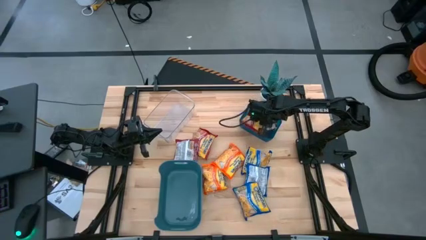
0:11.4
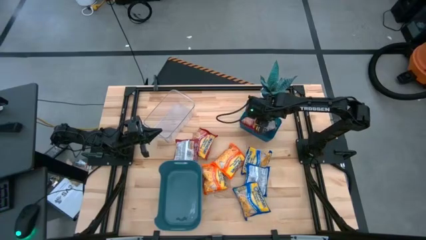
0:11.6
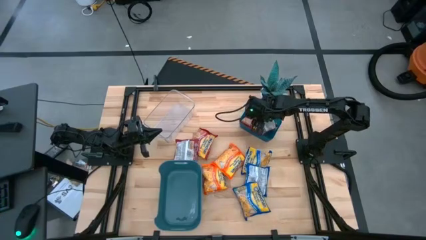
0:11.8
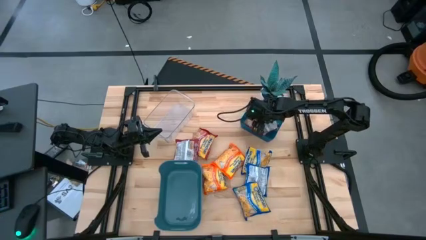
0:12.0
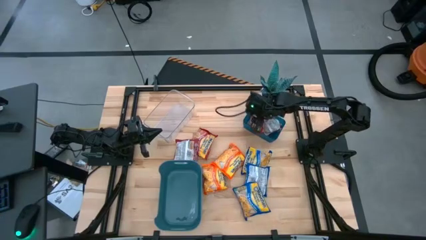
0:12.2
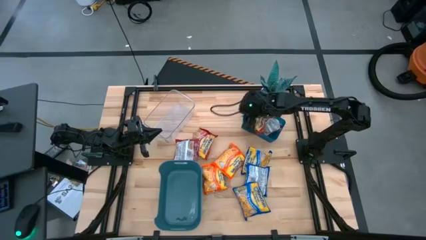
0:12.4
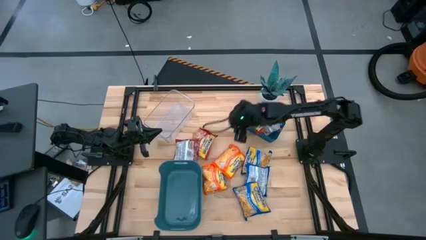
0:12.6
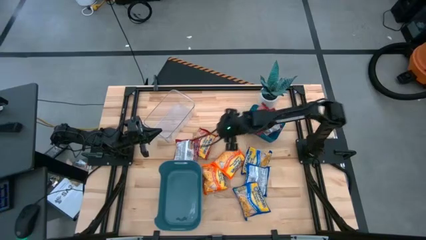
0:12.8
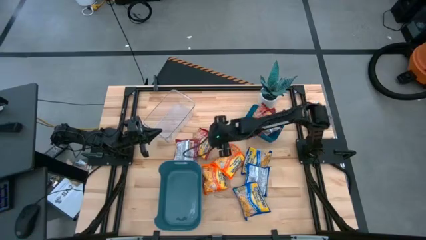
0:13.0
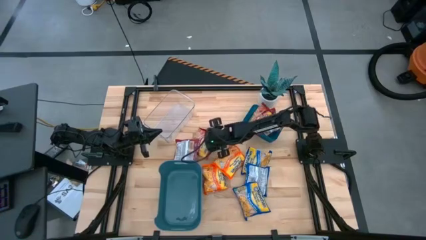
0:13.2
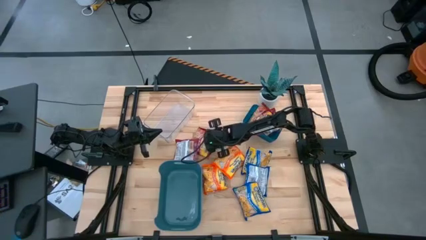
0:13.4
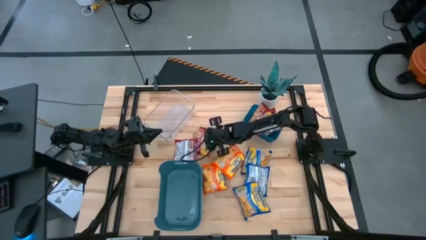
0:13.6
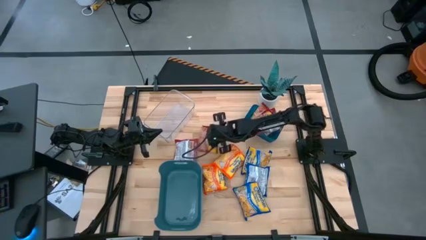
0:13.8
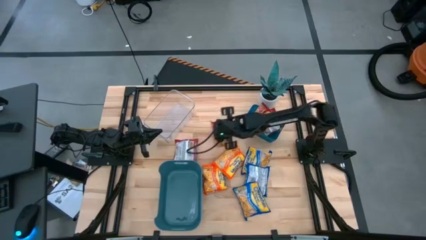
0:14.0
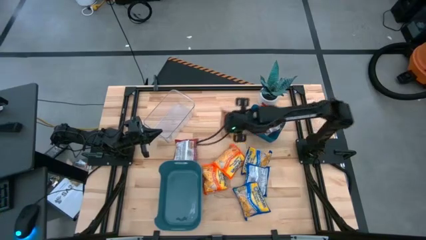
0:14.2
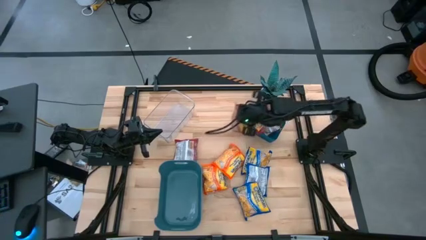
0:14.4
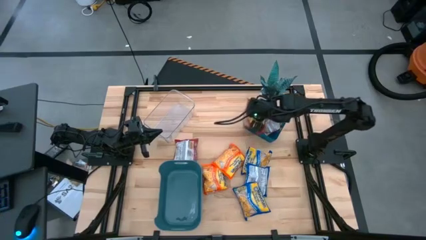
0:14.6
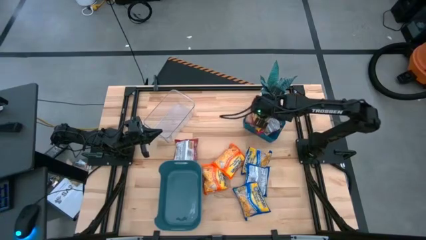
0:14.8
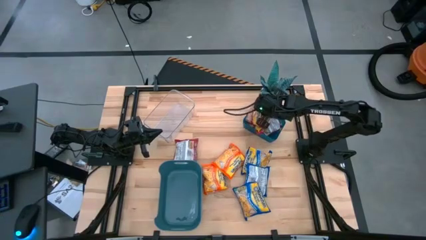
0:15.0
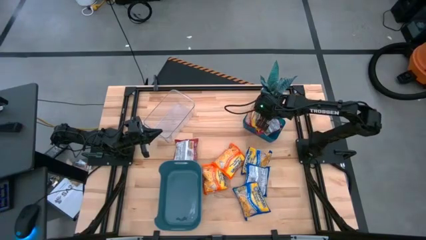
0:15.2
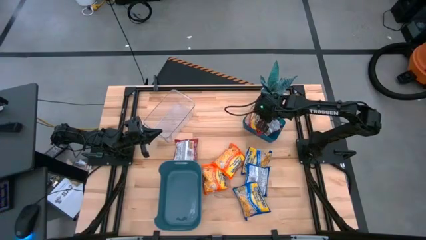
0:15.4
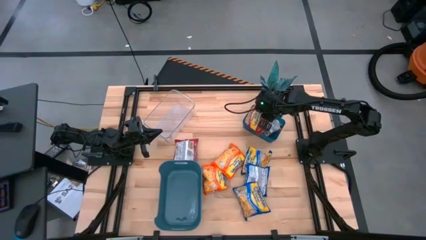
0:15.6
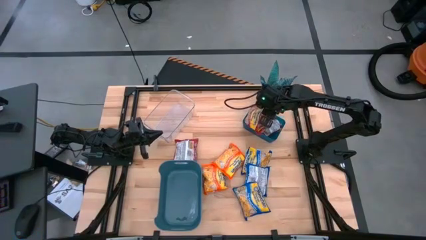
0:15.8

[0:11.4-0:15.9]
Task: Sort Maruchan noodles
Put the red noodle pack into the small blue bin

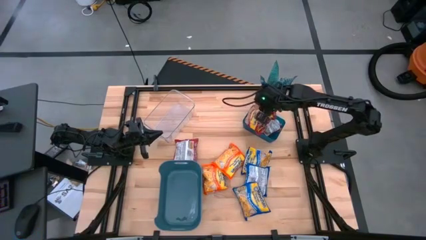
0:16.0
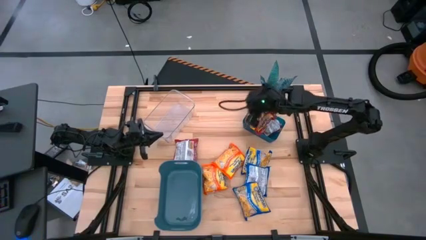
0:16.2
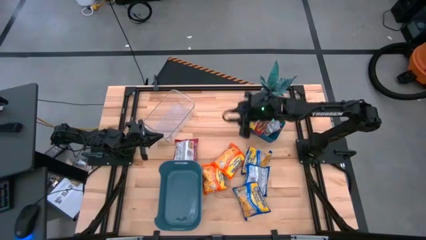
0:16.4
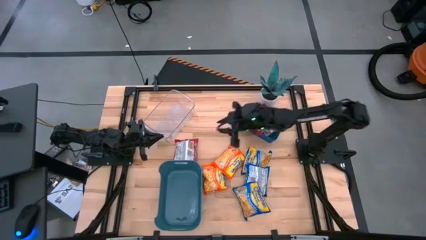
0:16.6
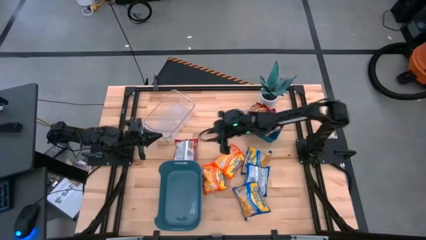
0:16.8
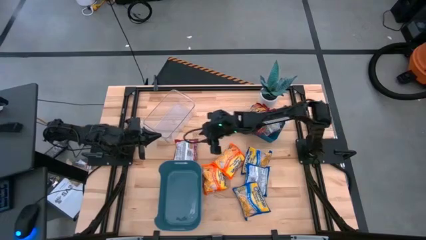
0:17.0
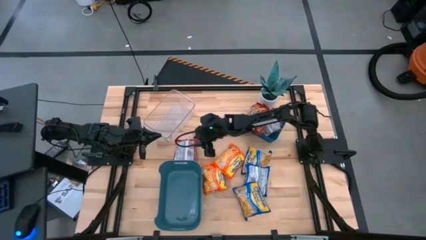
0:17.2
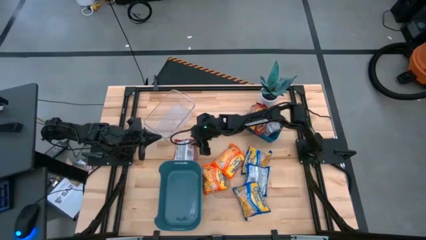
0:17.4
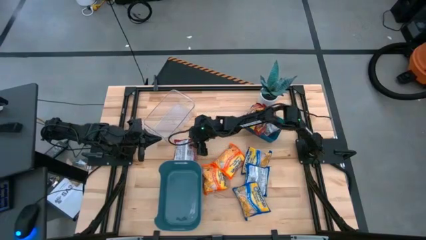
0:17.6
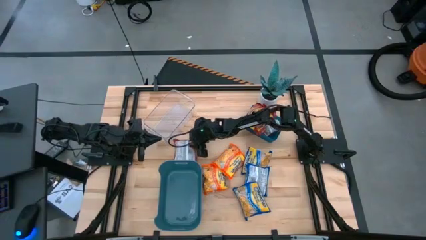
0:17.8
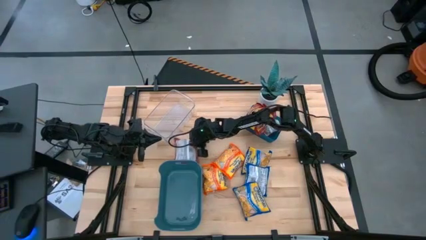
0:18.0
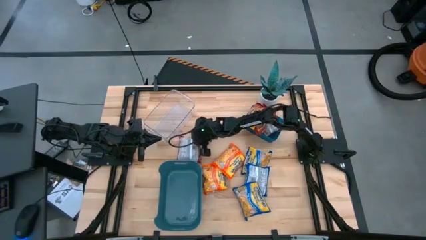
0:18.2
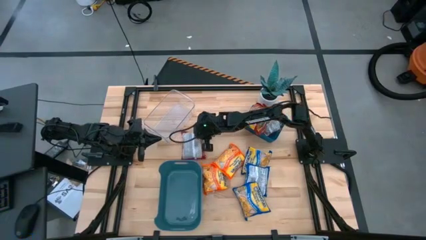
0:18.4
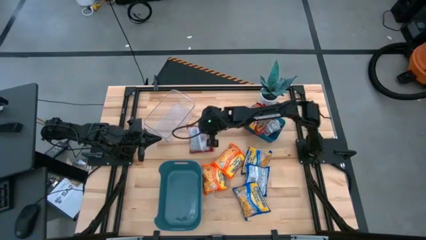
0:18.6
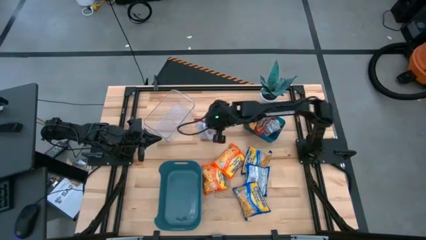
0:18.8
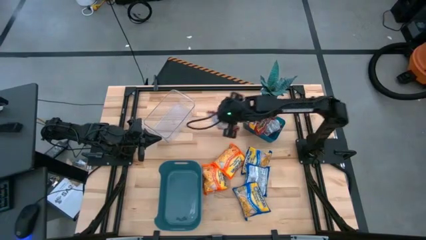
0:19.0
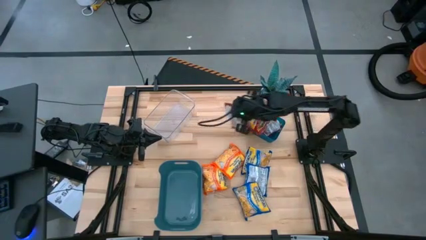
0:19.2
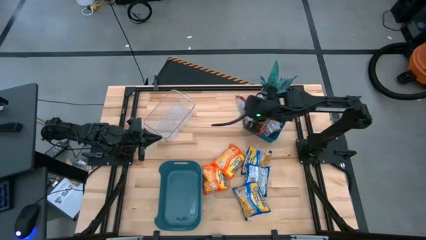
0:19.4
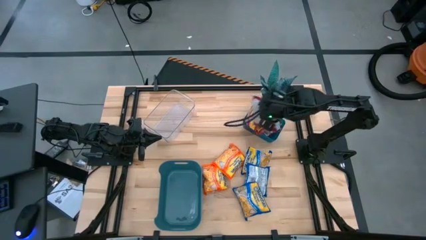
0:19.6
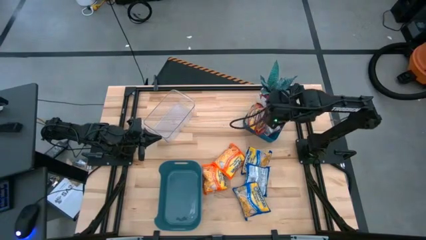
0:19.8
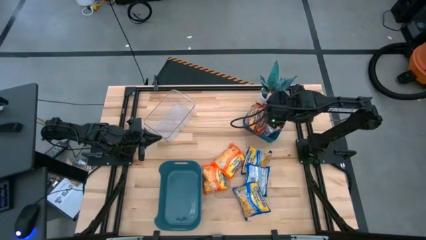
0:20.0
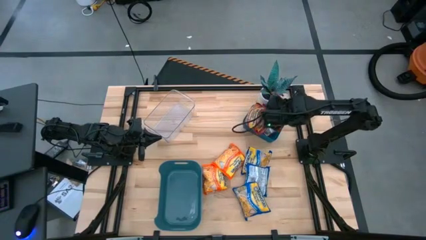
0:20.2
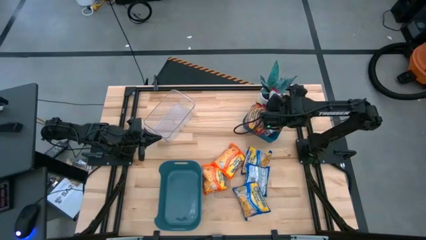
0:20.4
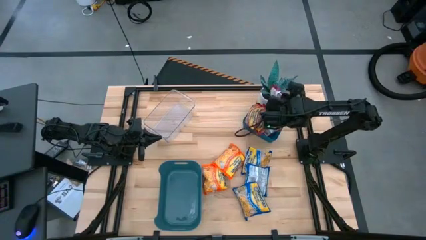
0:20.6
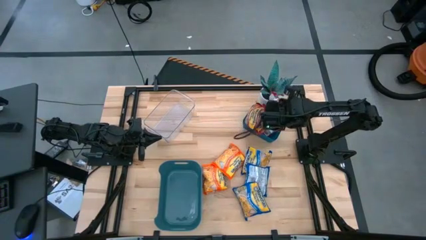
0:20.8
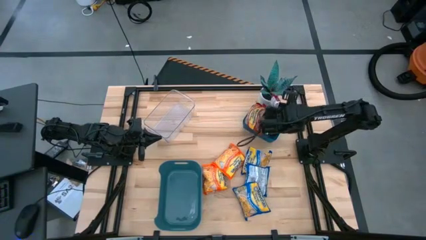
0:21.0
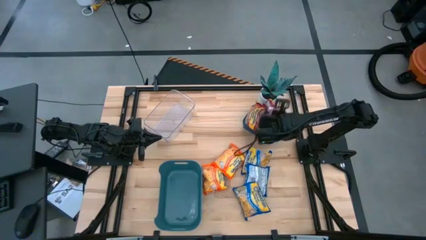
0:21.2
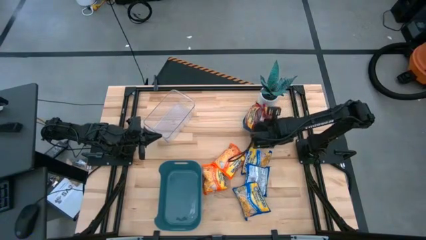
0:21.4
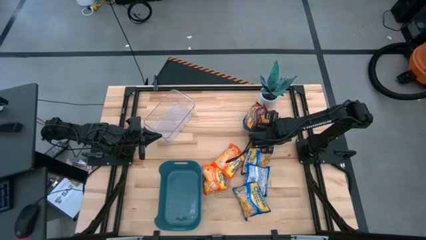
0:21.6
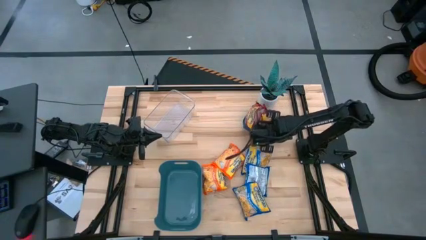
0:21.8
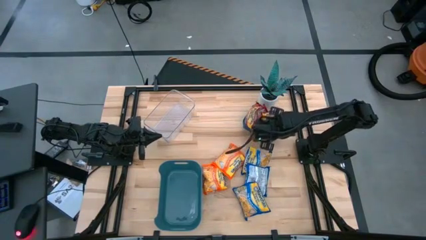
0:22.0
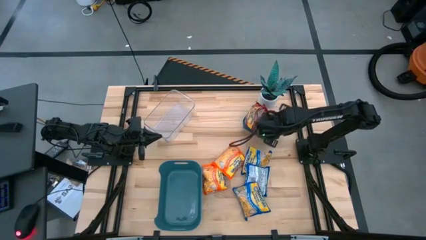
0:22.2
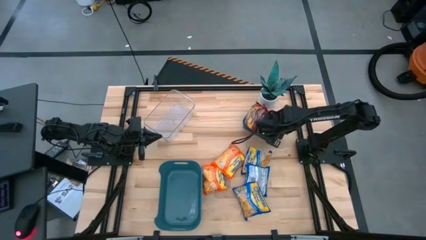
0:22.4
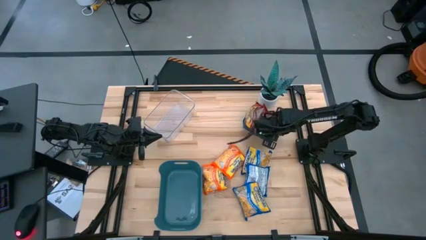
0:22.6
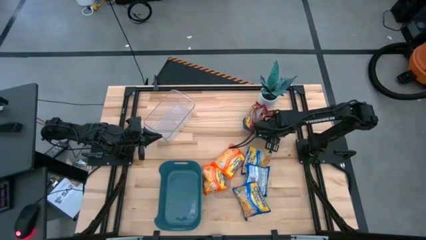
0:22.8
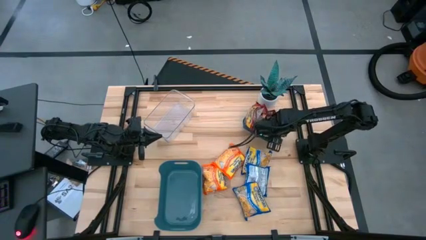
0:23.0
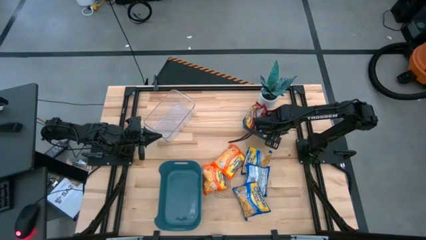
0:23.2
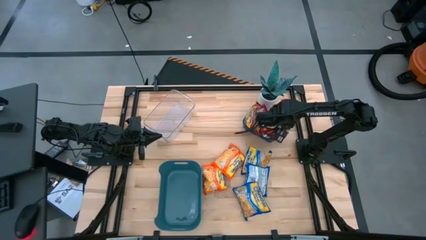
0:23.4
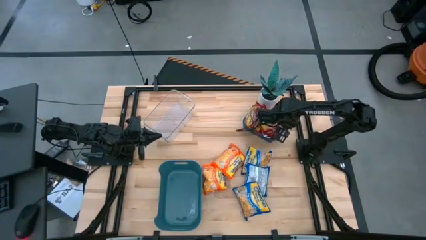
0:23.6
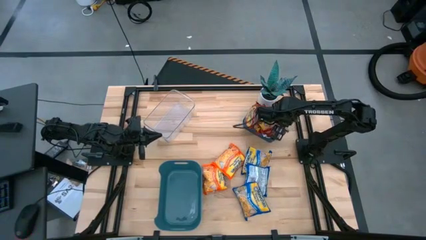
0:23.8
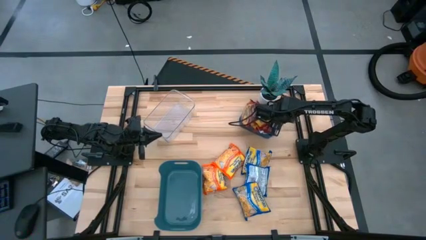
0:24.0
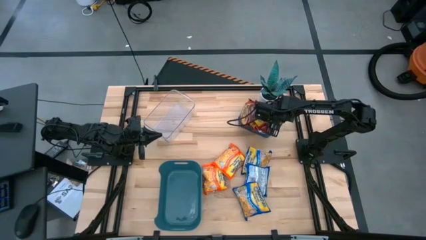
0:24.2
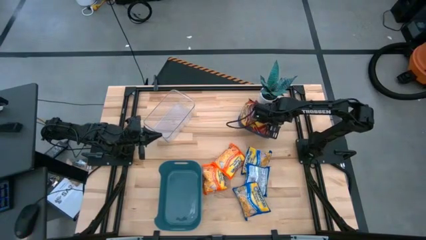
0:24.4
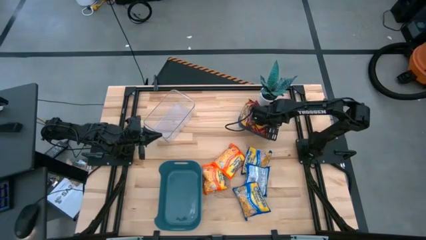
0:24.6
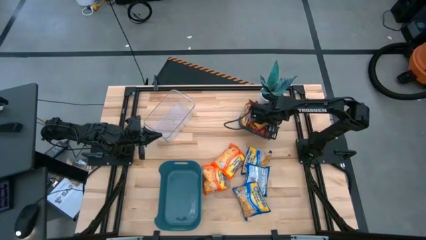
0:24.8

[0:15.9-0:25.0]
Put the red noodle pack into the small blue bin

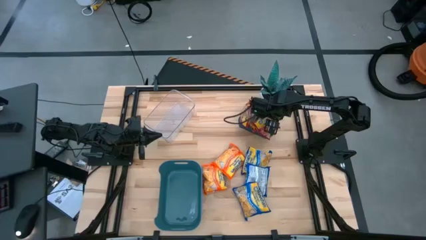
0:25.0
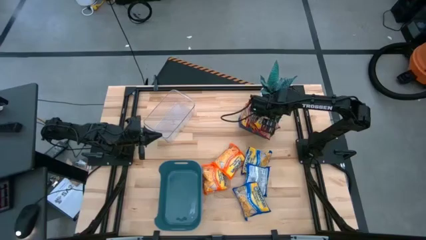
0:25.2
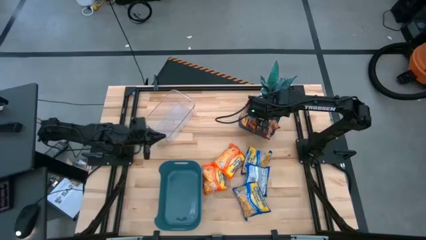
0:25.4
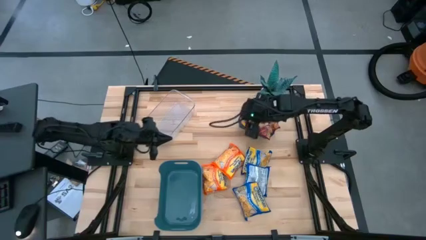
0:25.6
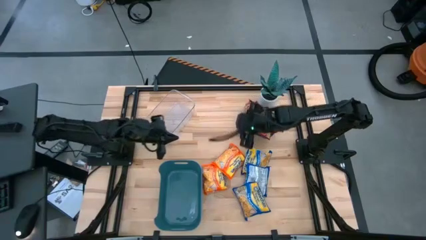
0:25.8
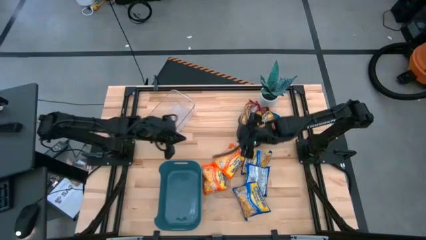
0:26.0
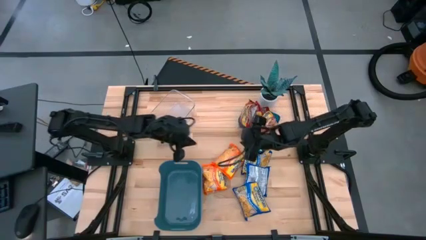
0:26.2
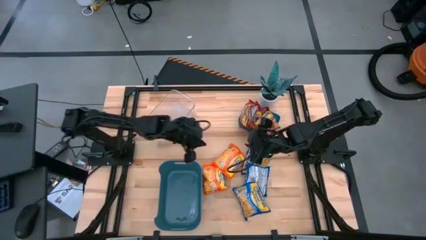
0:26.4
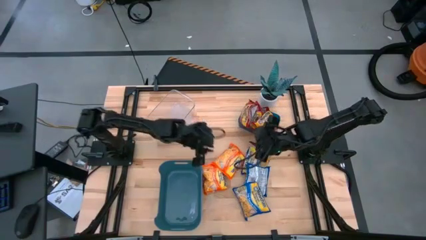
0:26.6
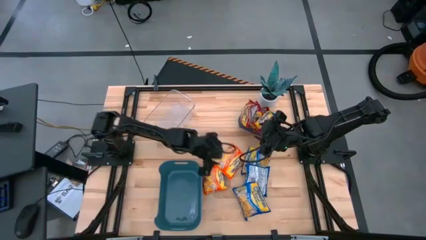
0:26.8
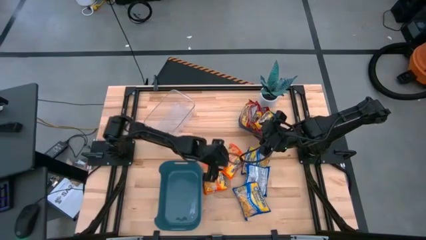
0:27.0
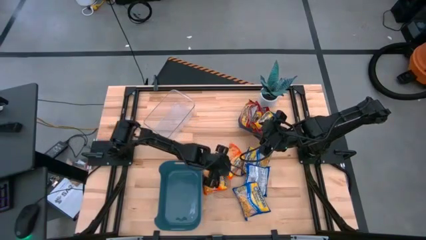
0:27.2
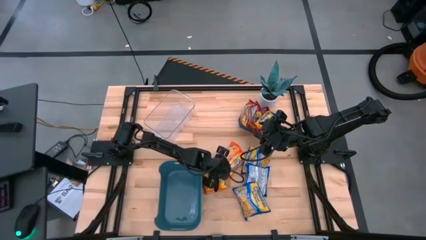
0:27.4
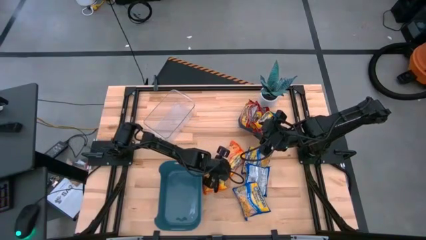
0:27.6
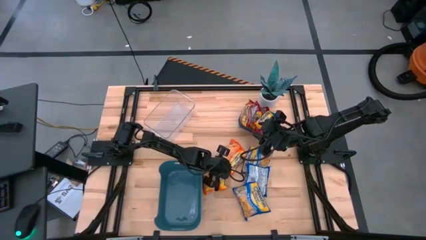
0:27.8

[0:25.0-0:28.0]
Put the top orange noodle pack into the transparent bin

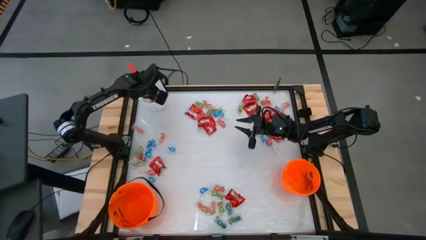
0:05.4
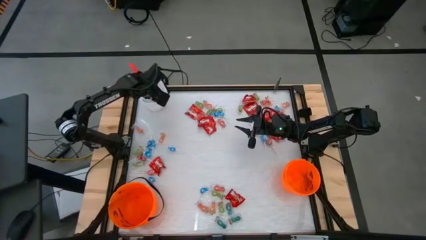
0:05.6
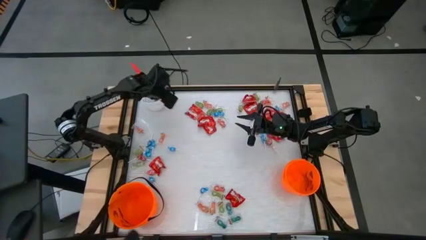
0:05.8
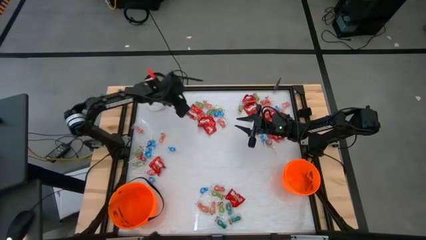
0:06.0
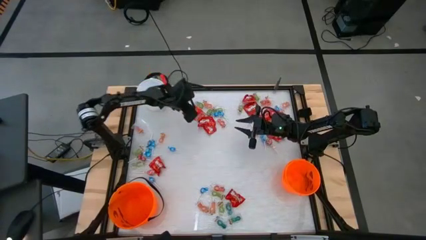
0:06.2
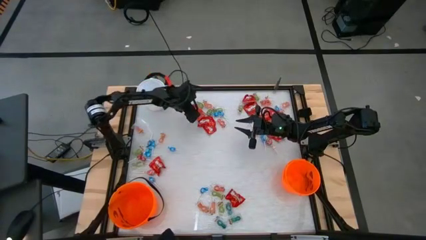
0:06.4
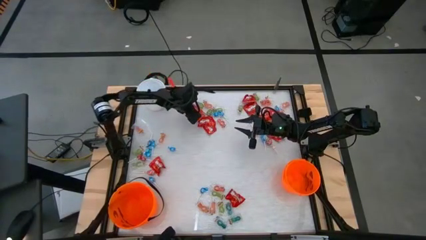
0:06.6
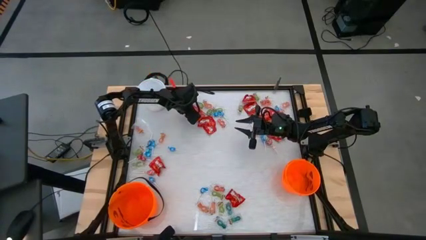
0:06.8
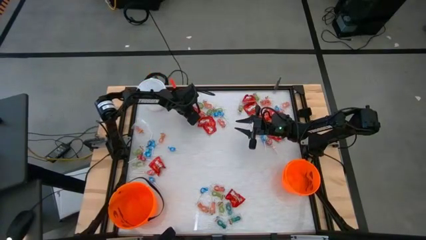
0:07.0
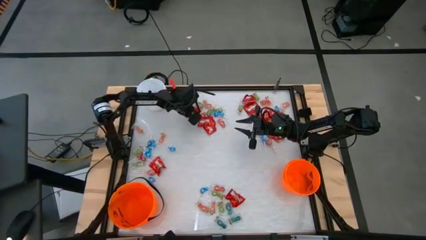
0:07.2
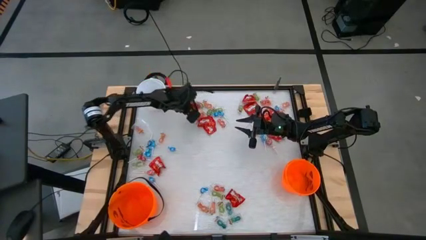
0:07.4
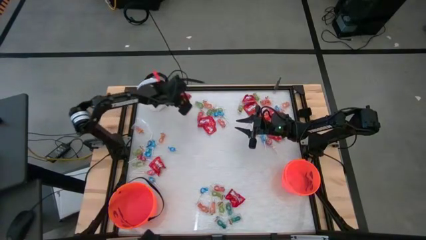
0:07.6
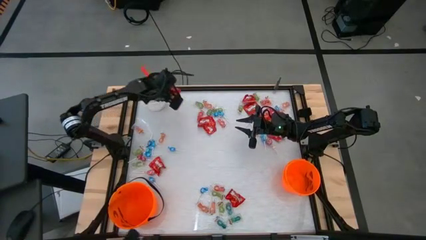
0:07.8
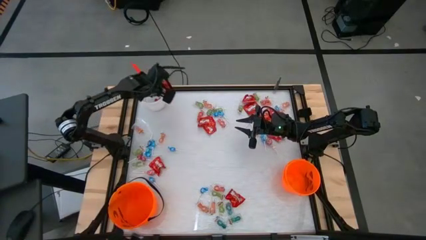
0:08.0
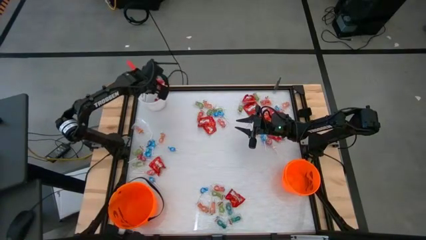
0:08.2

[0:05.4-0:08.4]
Task: Sort candy by brand, put in halloween buckets
Put the skittles into the white bucket
